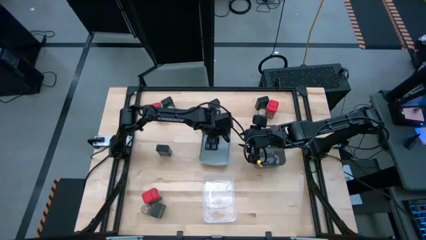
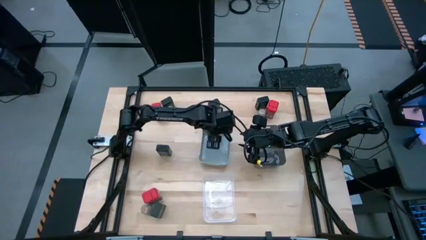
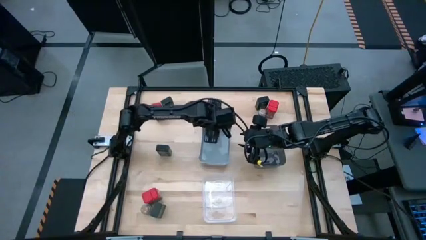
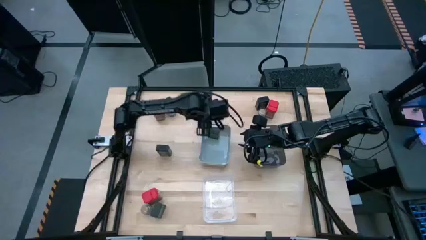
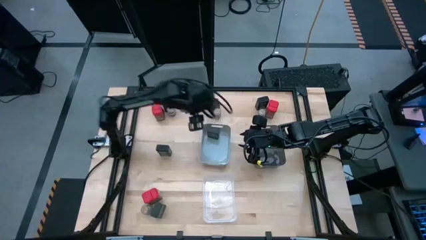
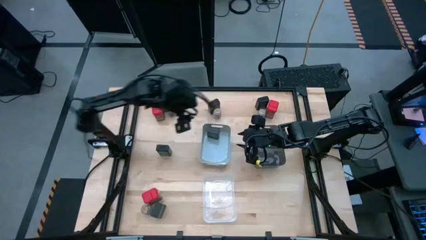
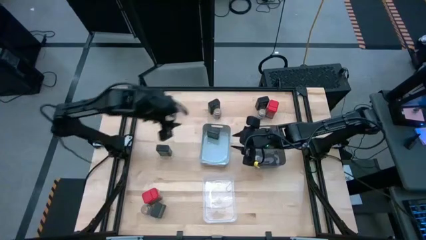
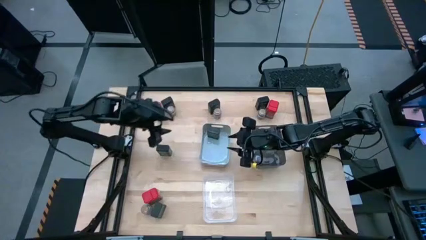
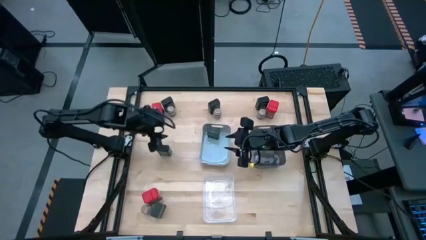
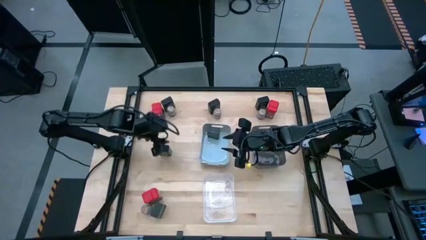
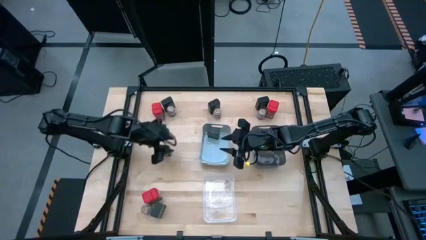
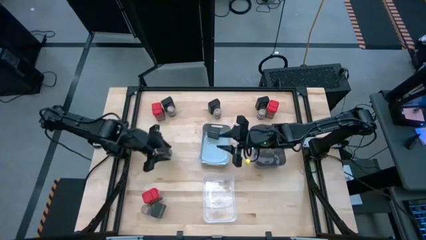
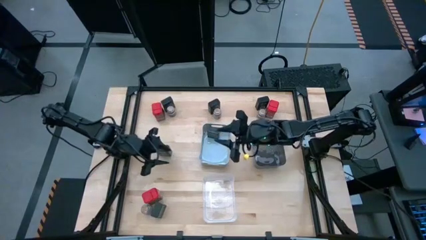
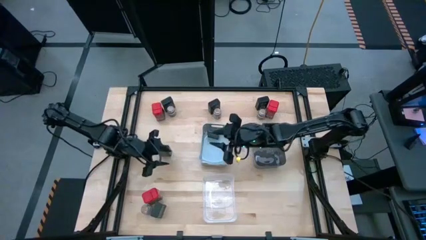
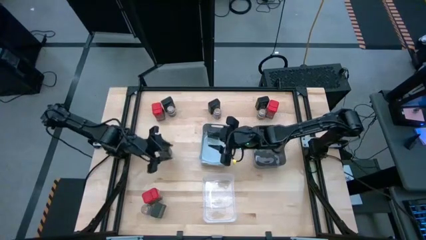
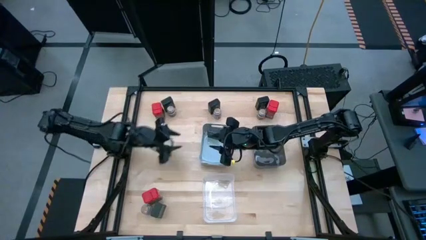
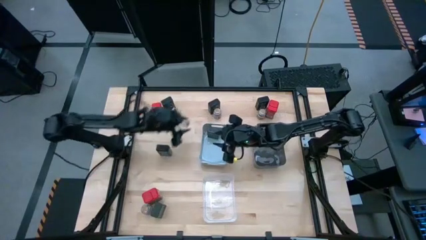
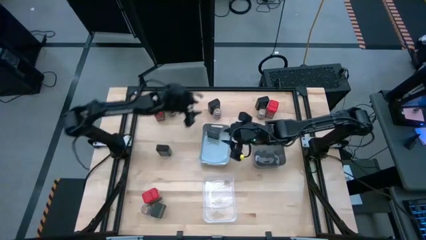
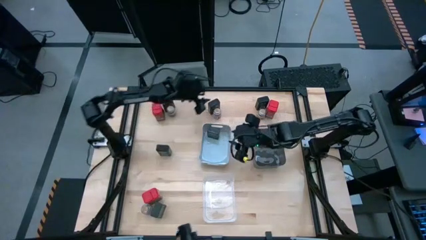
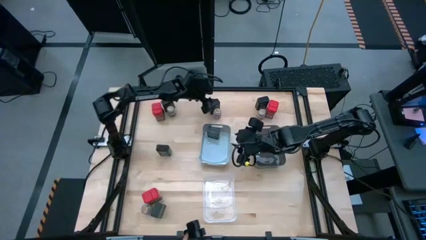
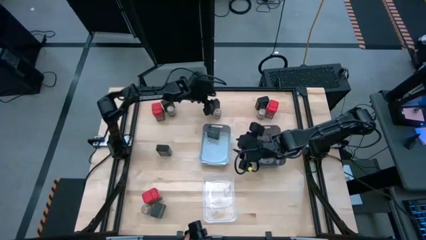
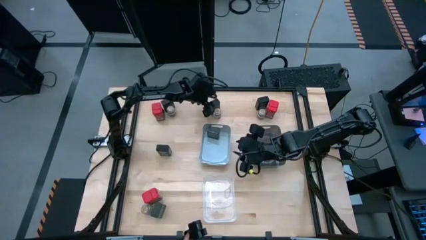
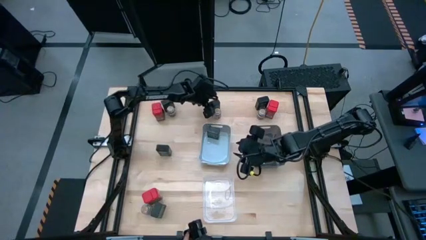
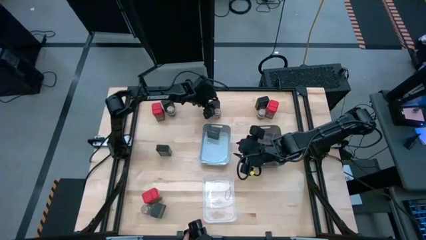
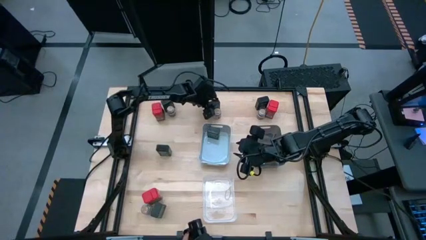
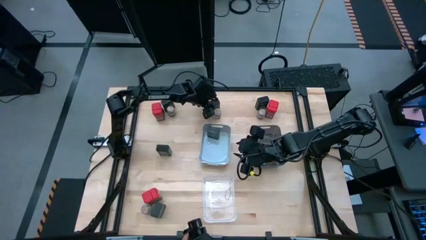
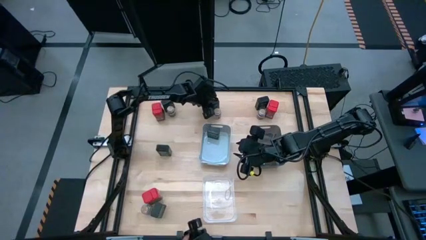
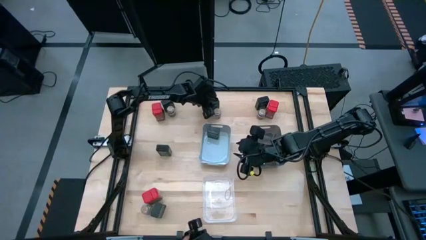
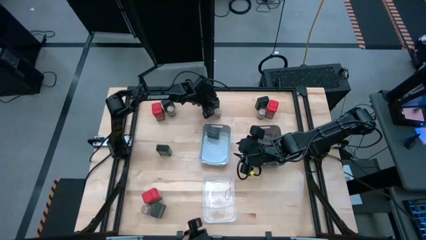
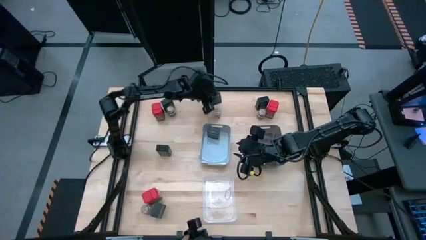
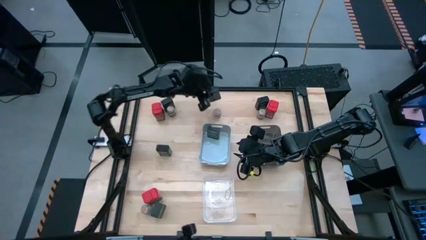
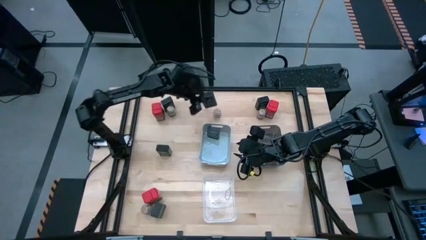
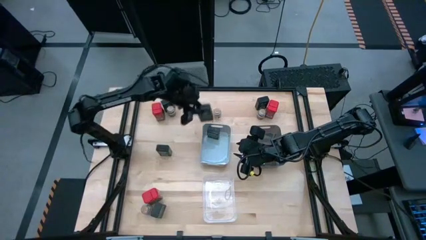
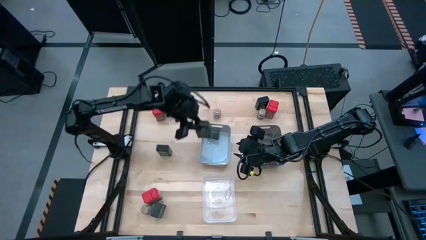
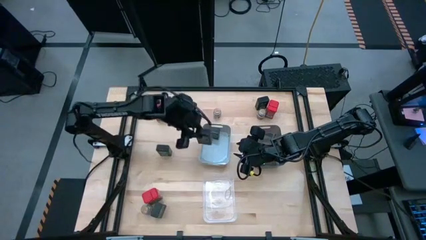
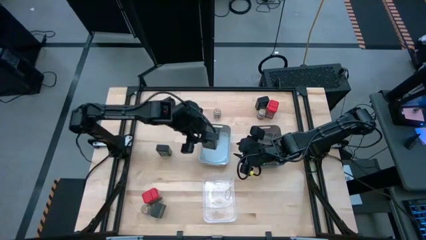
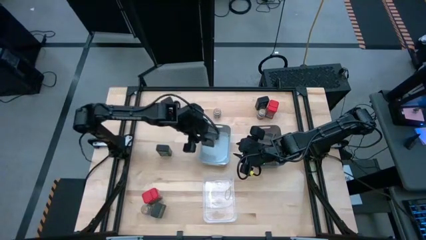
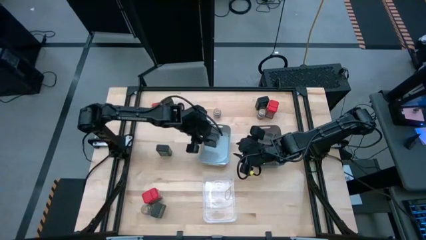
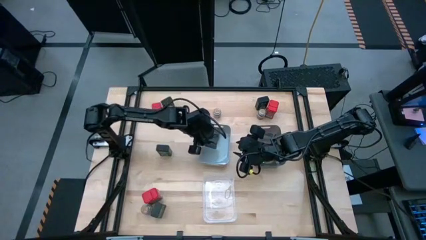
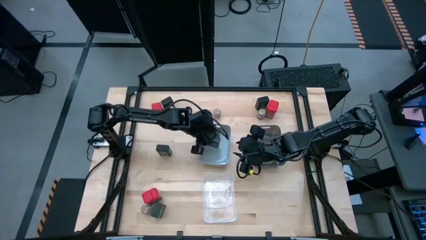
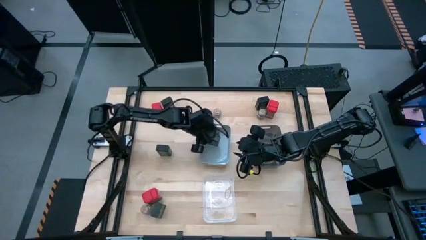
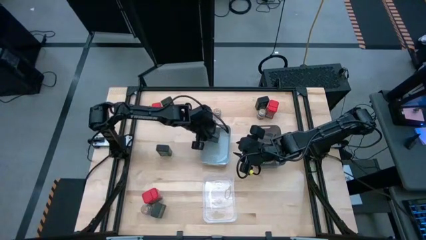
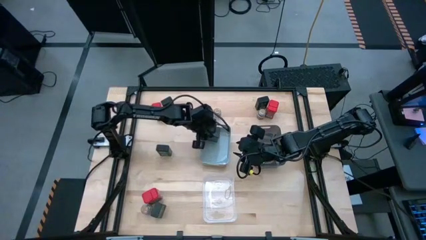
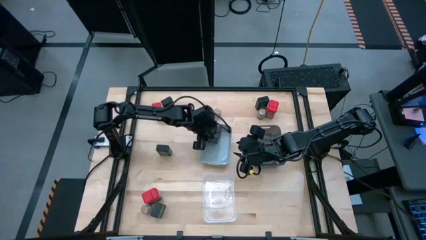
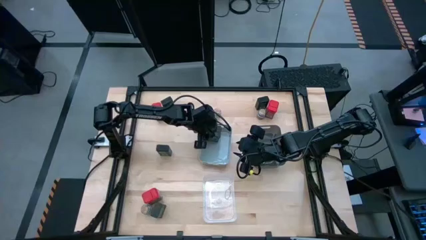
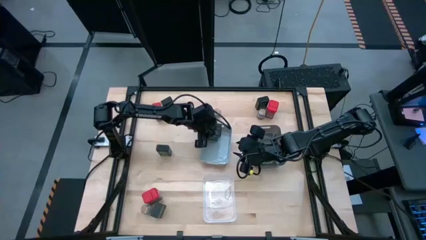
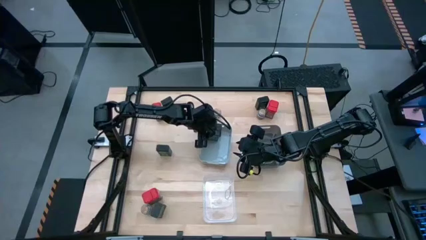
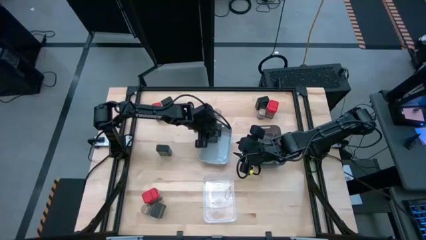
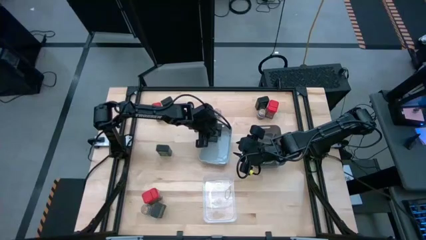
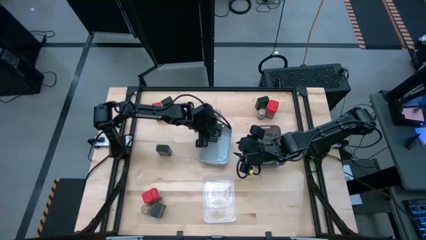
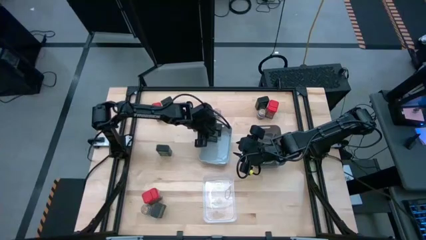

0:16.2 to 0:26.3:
Task: Sort spices by type
Put the black spice can into the gray bin

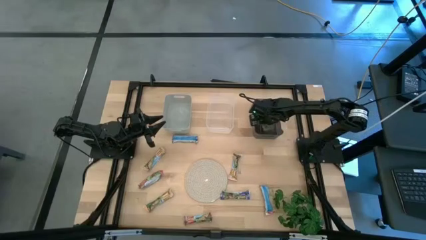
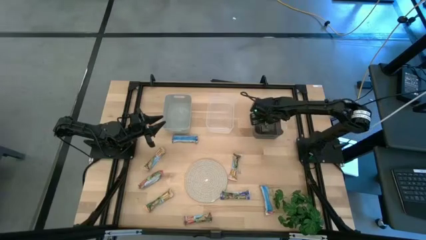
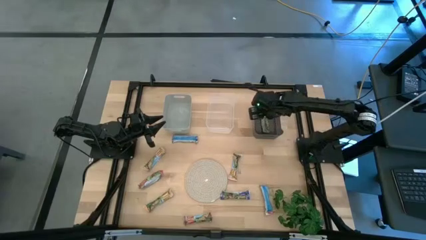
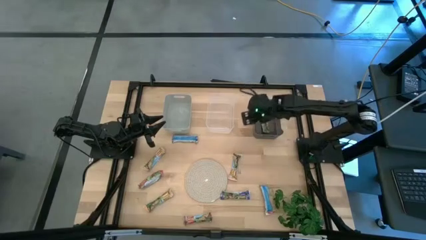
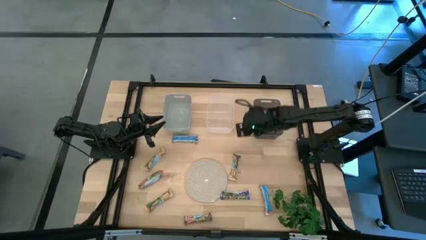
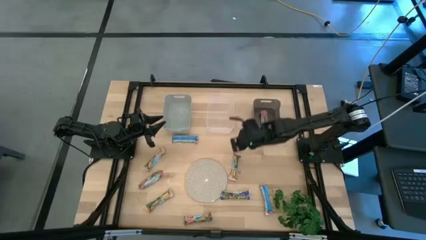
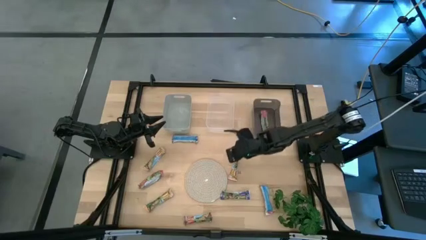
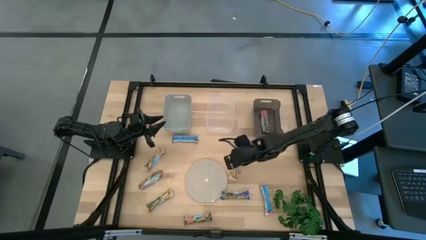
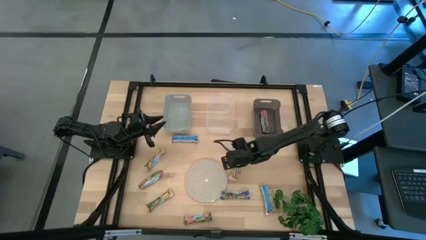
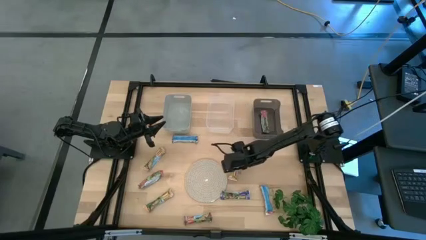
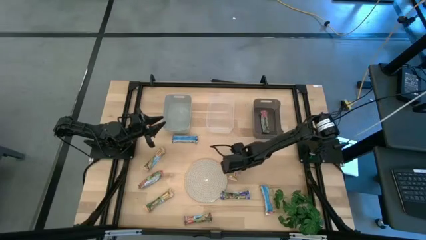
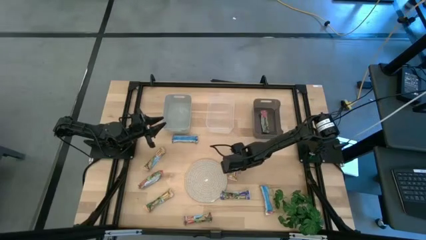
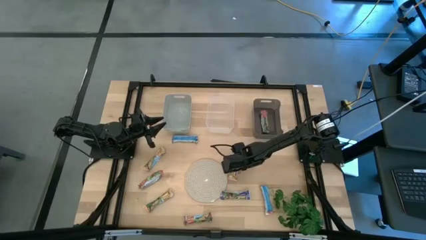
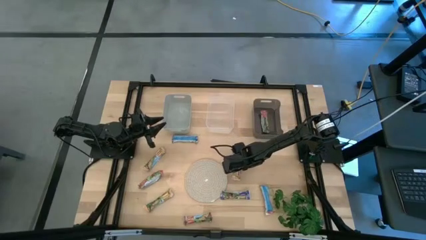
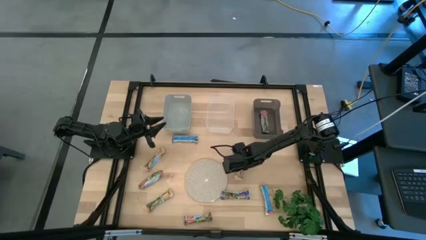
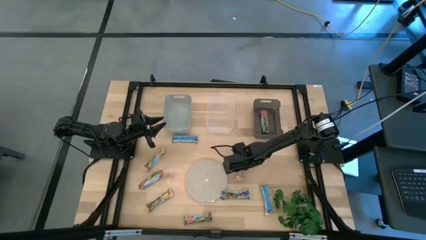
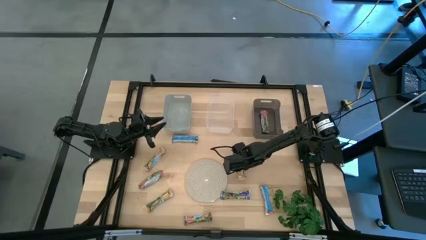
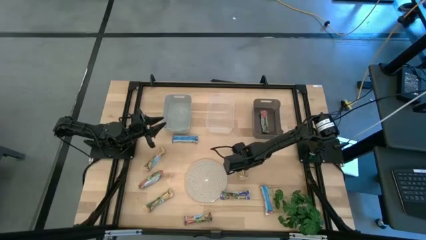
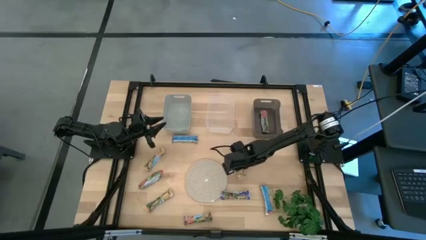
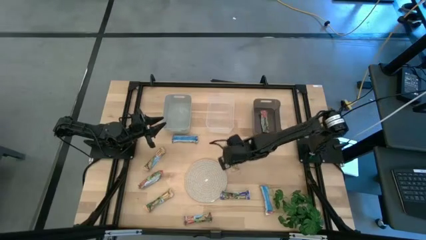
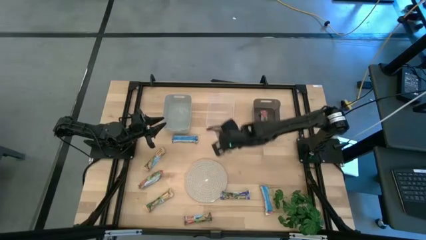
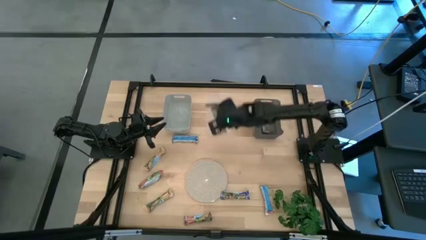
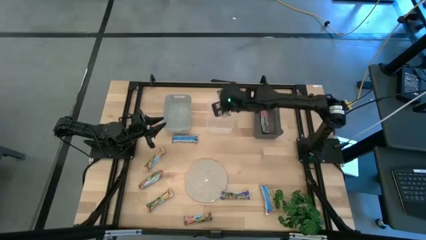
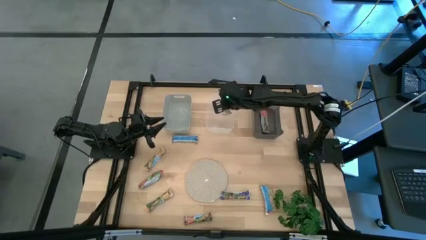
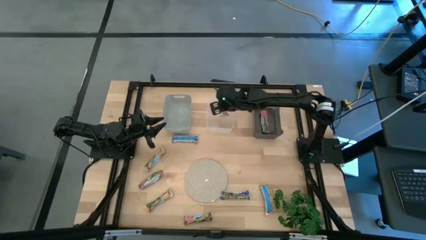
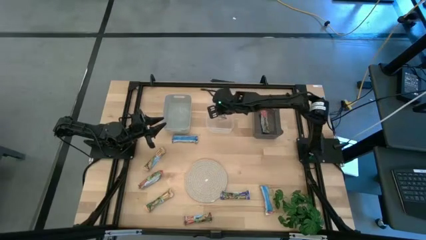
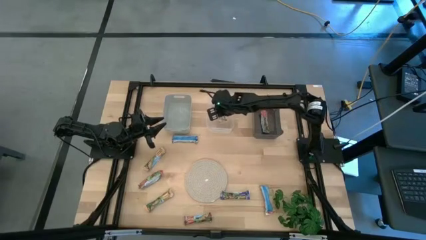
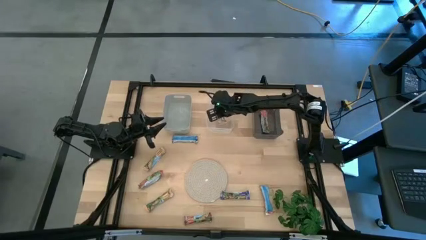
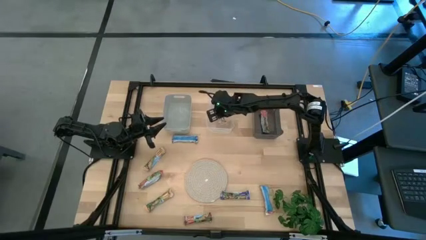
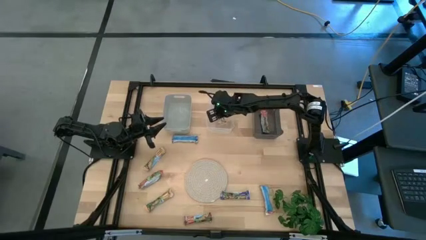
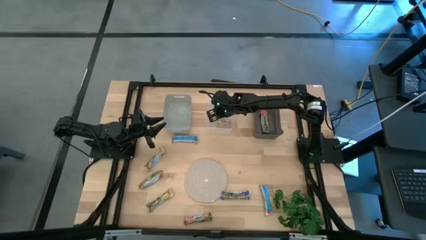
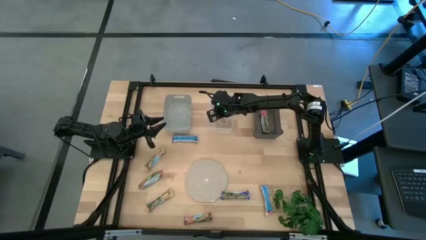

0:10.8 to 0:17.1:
Task: Pick and place Granola Bars by type
Put the yellow granola bar into the transparent bin
